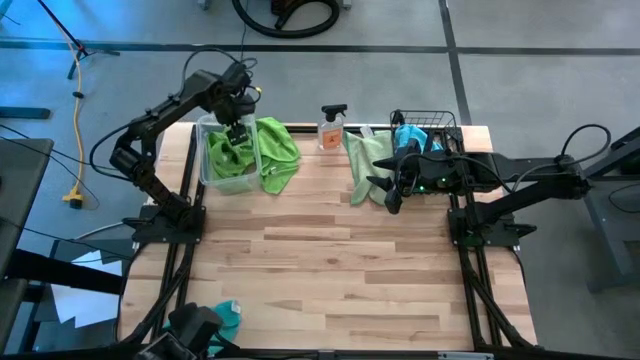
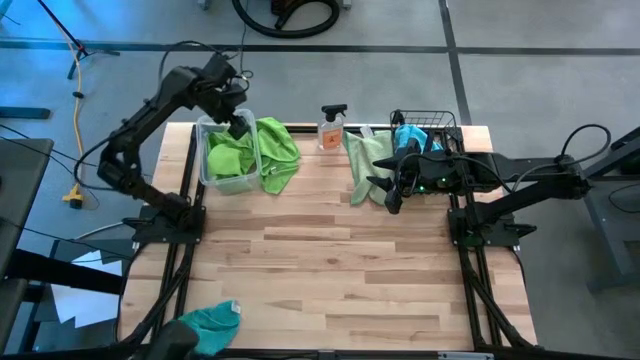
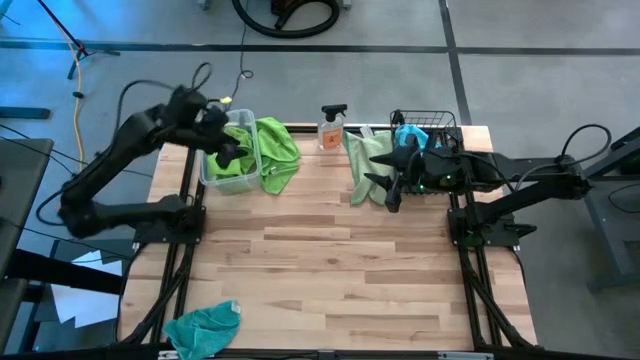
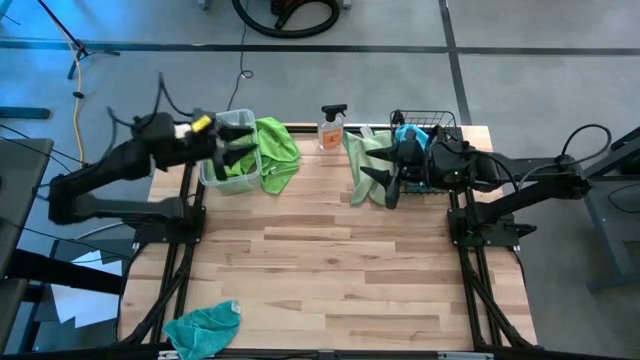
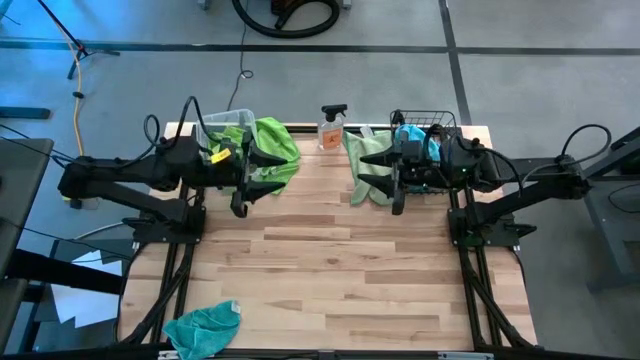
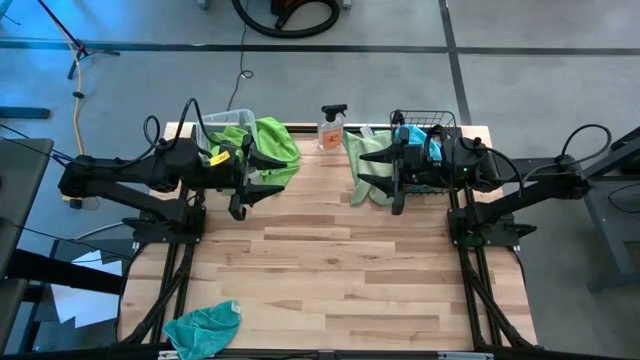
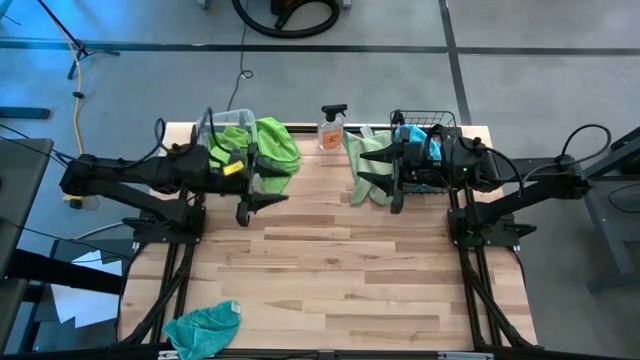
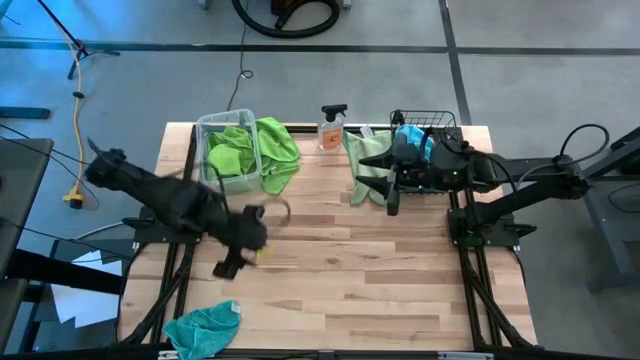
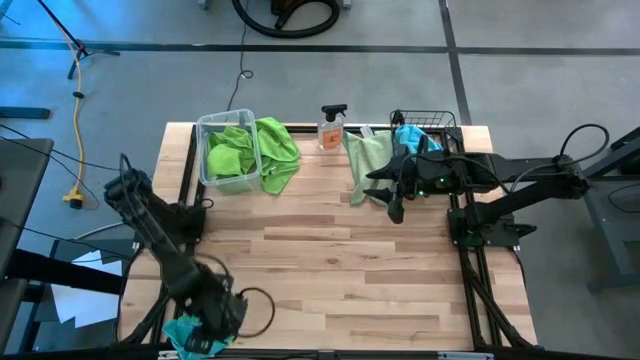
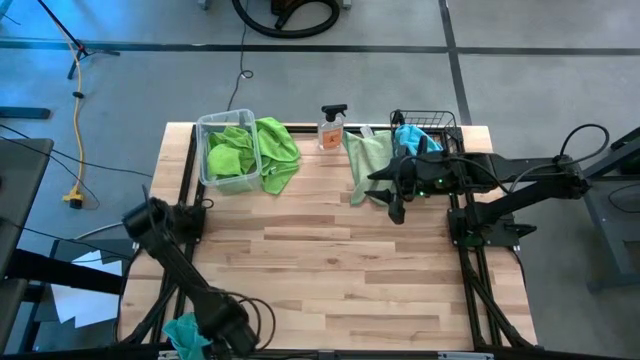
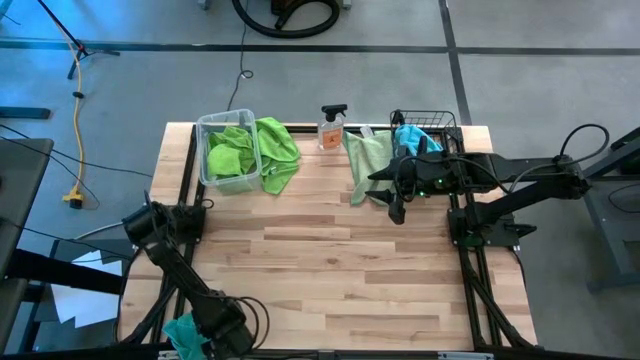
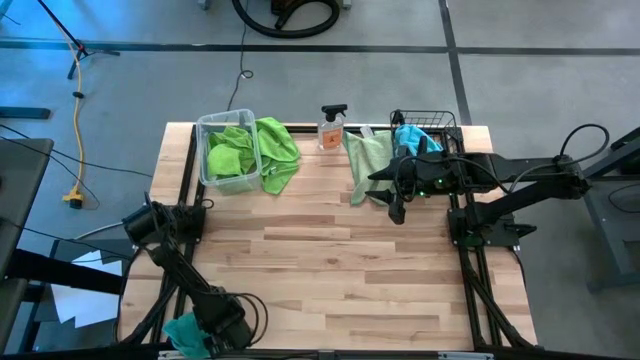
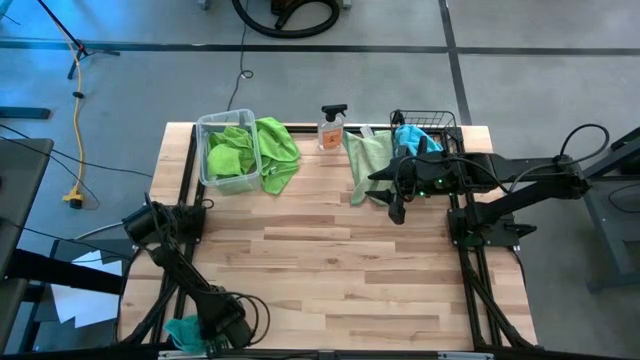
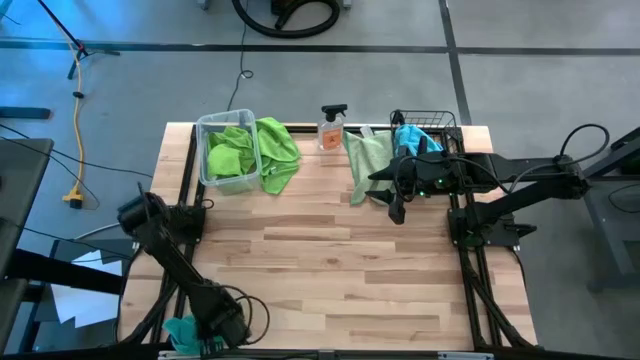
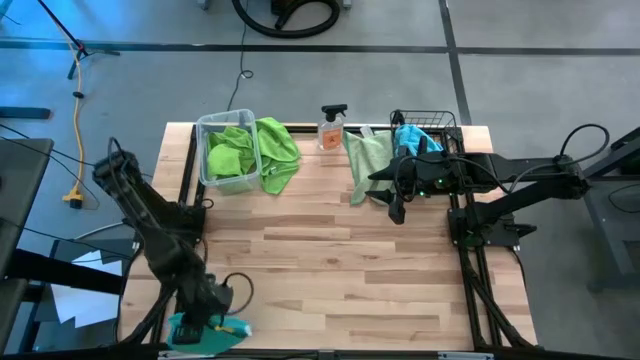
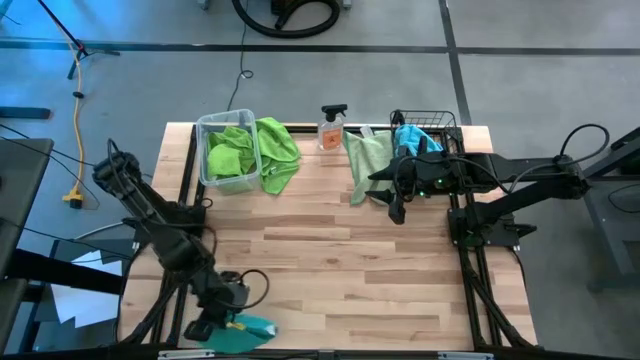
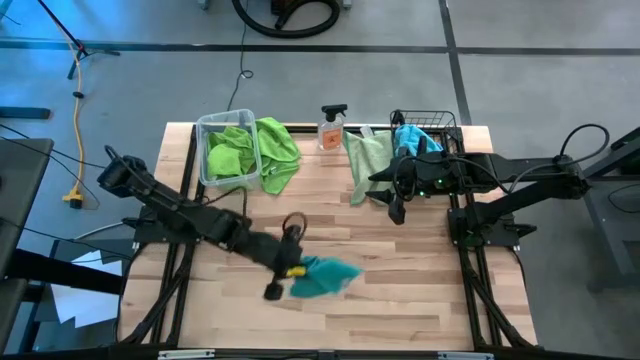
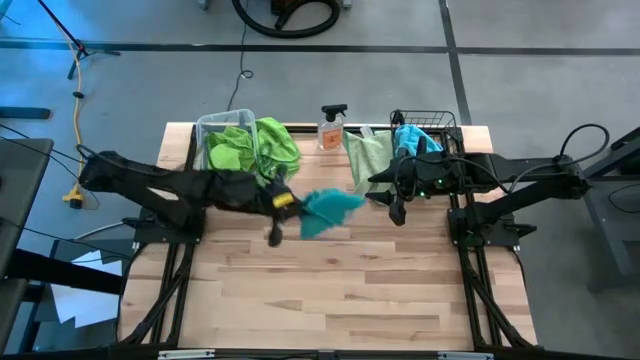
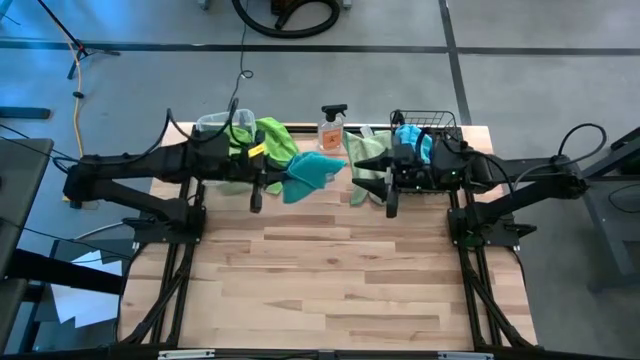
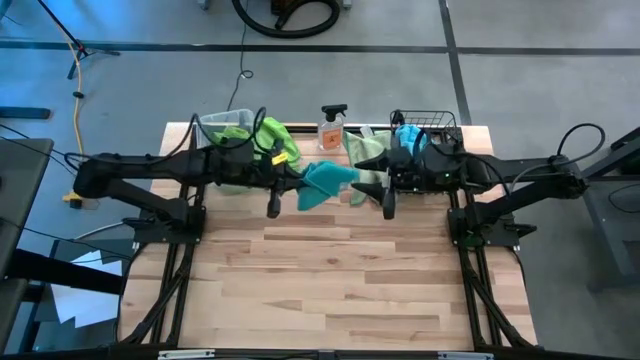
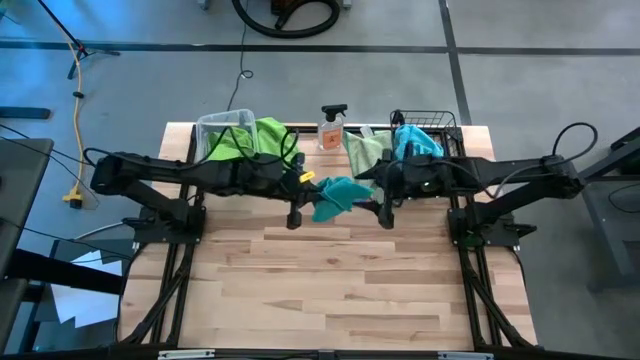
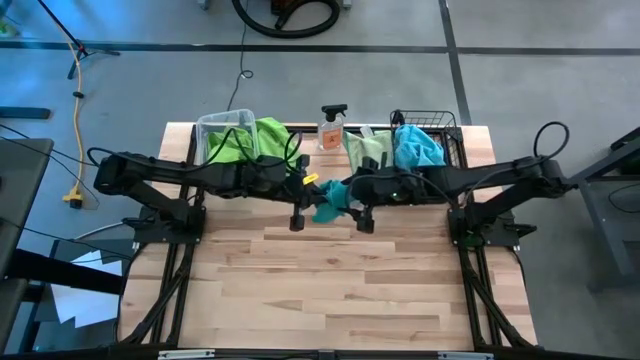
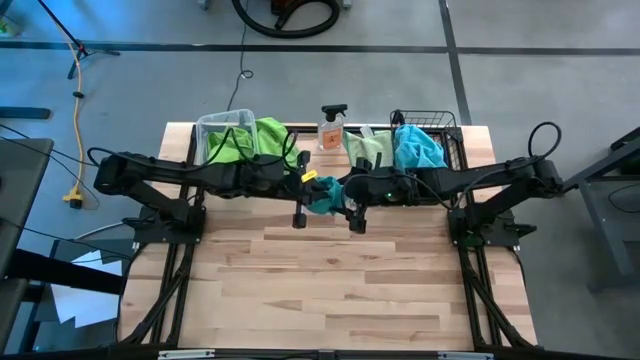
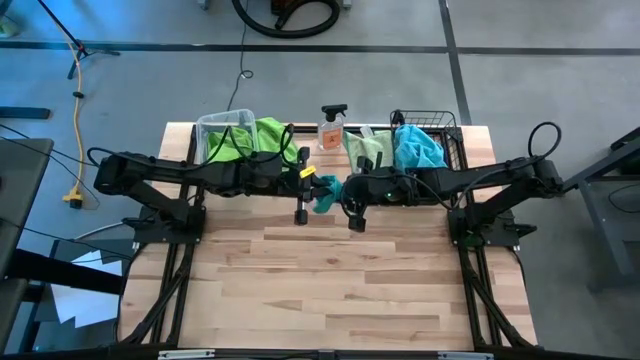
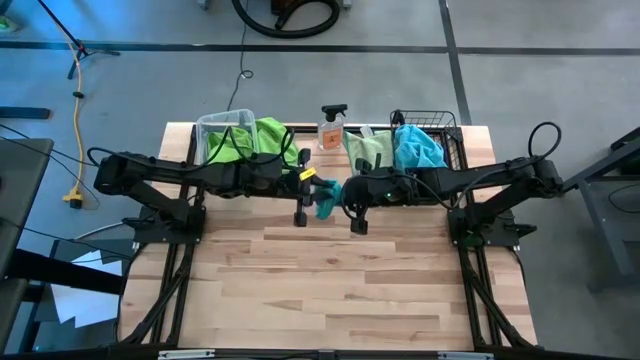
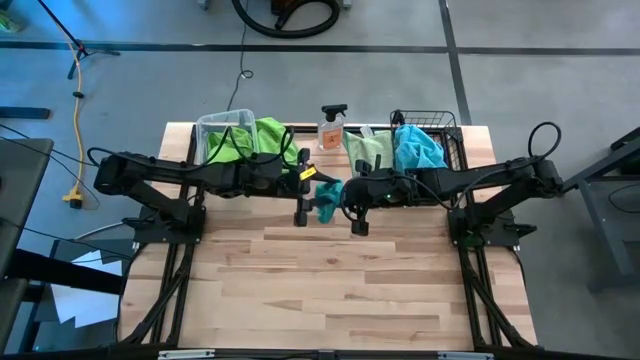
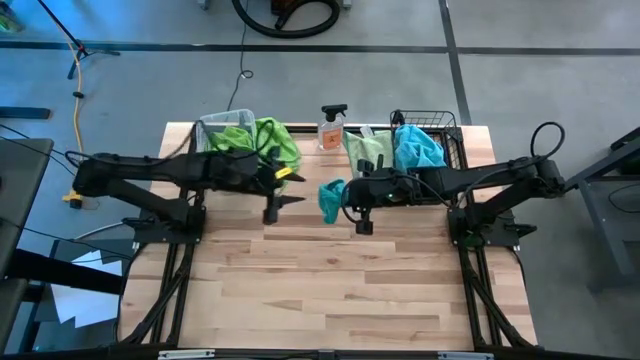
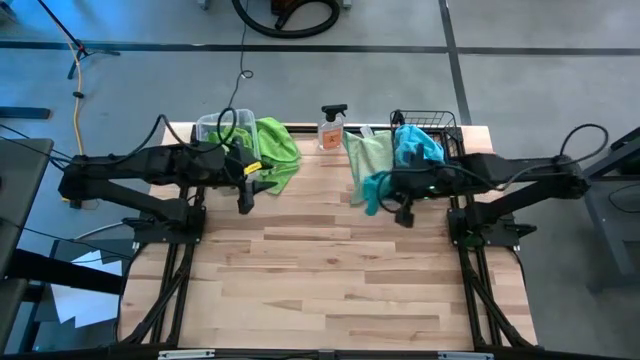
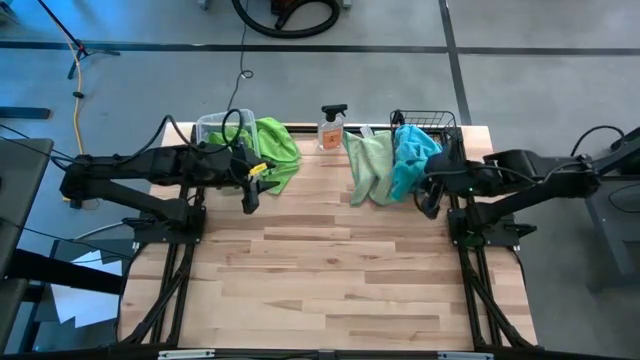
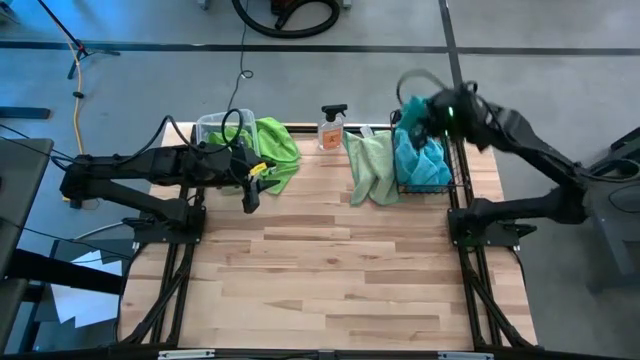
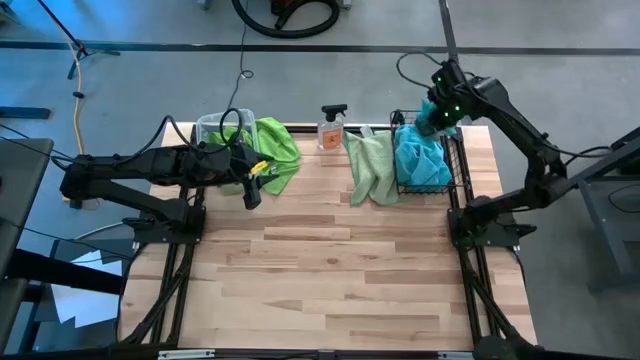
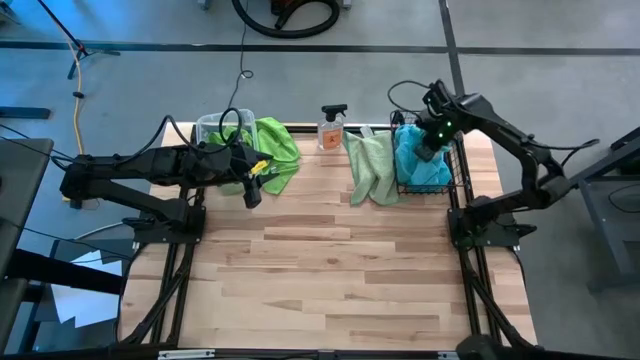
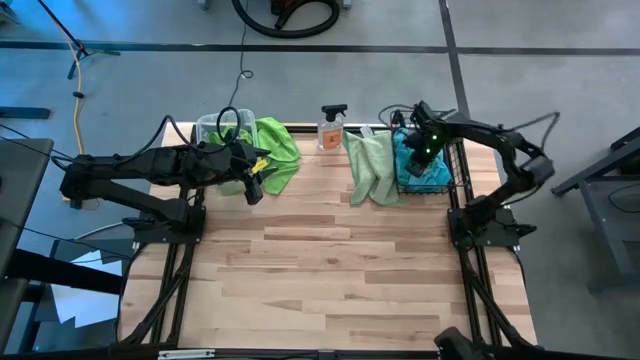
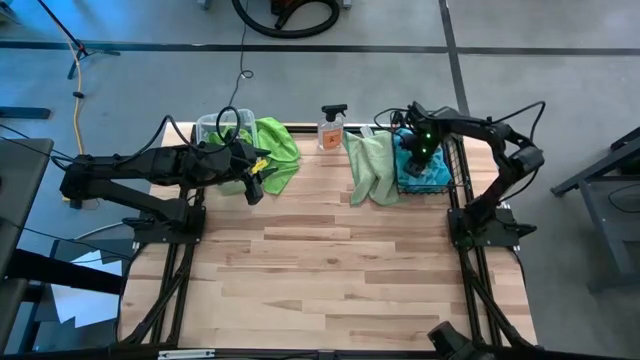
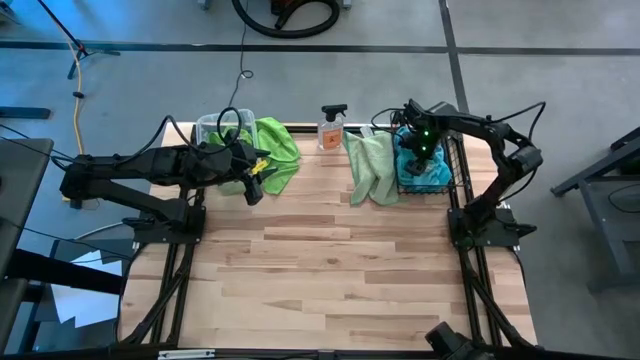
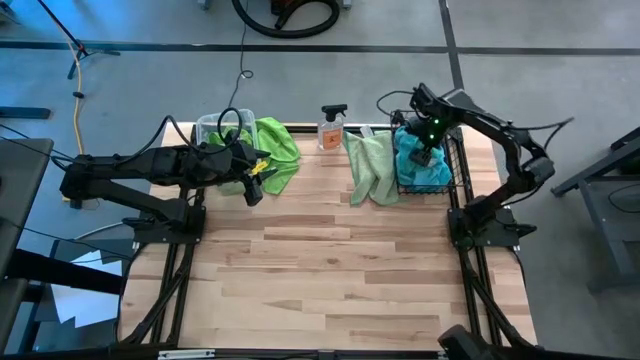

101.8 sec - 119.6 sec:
Task: Sort microfiber towel by color & place in baskets
Put the blue microfiber cloth into the basket

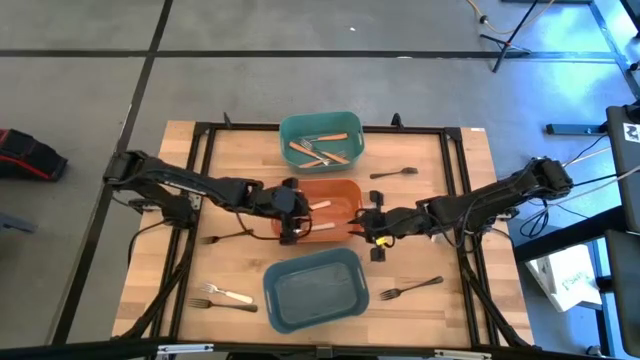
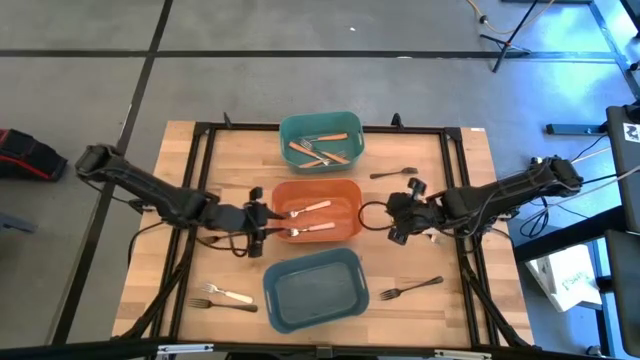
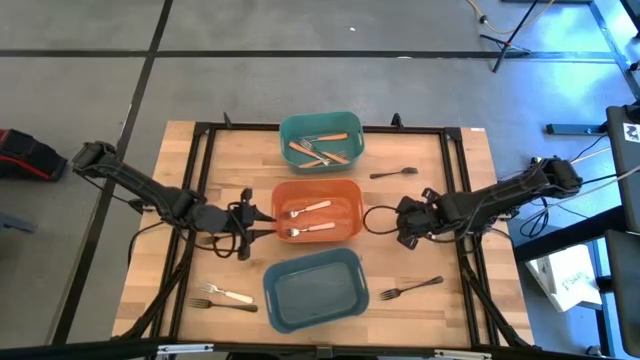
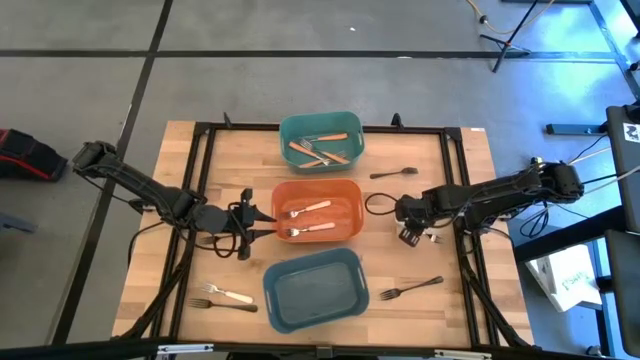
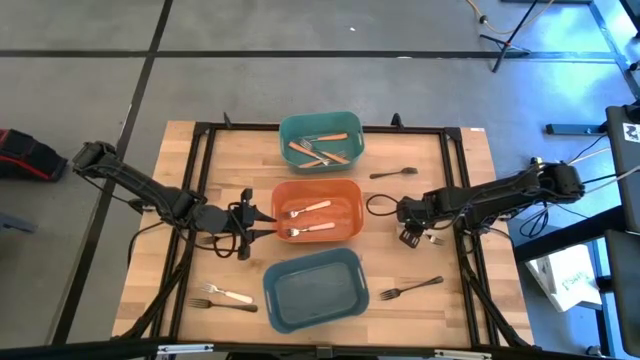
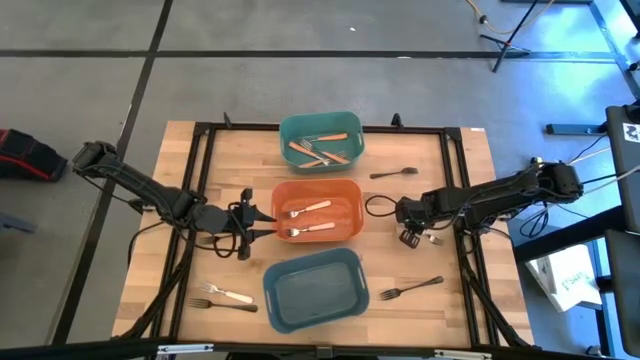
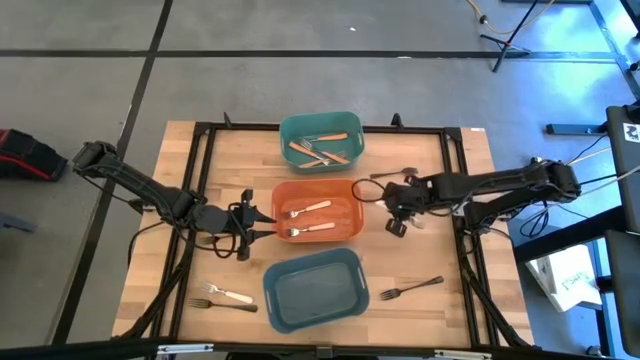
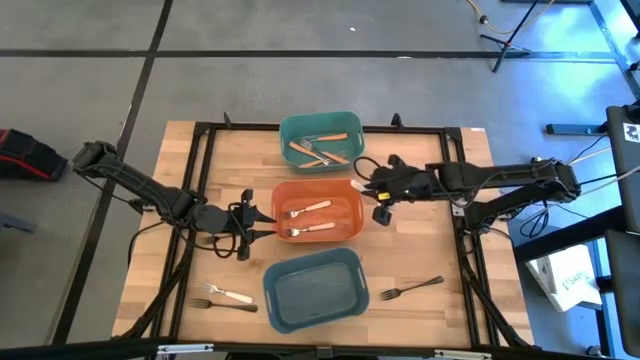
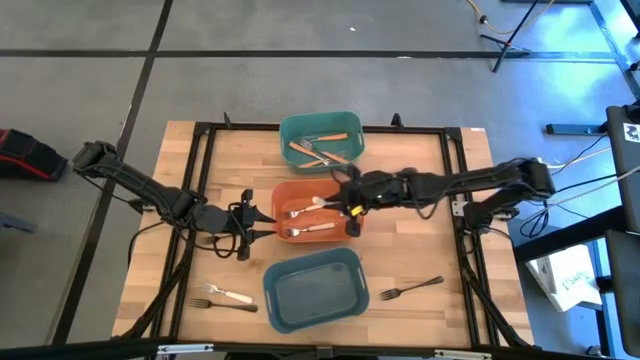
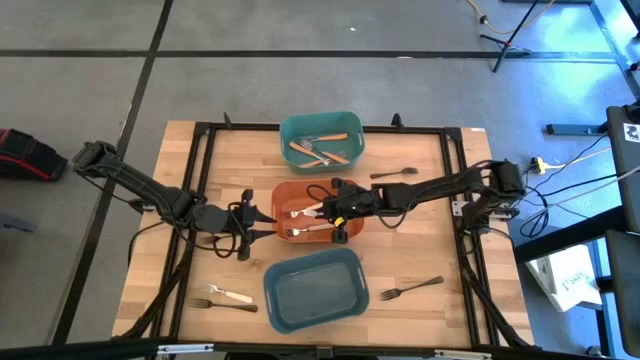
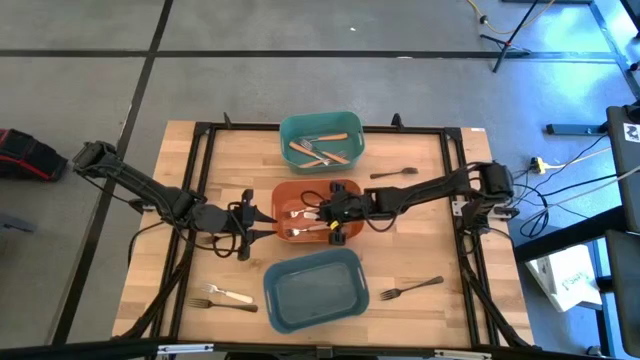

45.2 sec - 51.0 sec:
Task: Sort silverware by color (type)
Put the white fork into the orange bin
